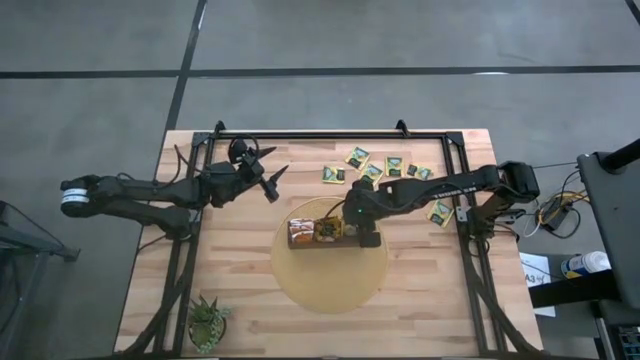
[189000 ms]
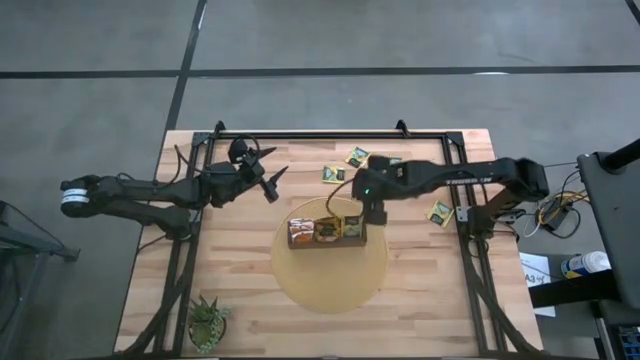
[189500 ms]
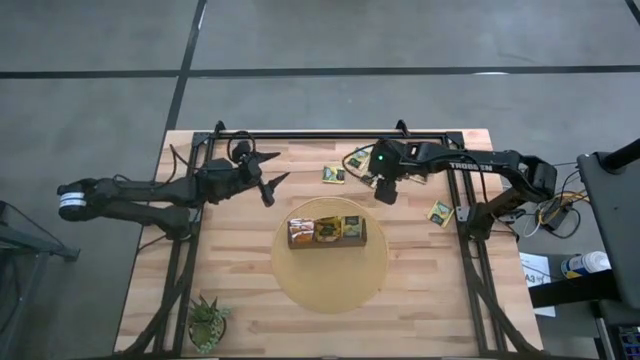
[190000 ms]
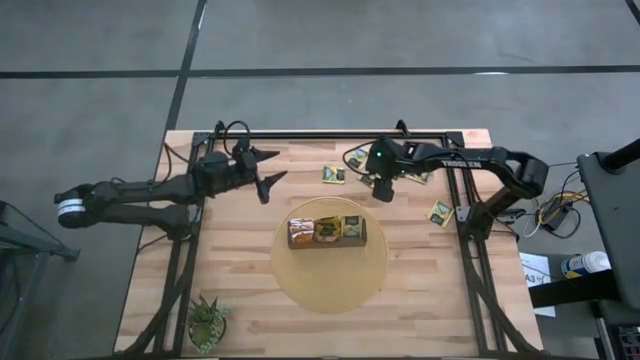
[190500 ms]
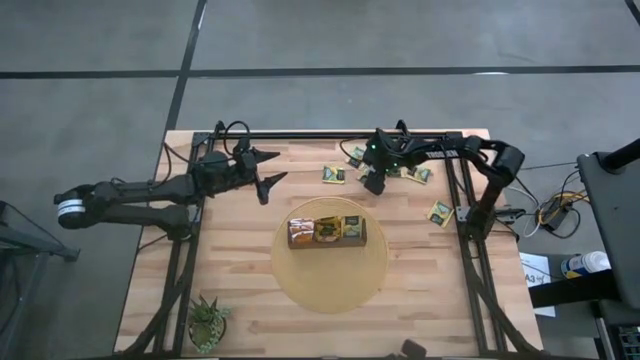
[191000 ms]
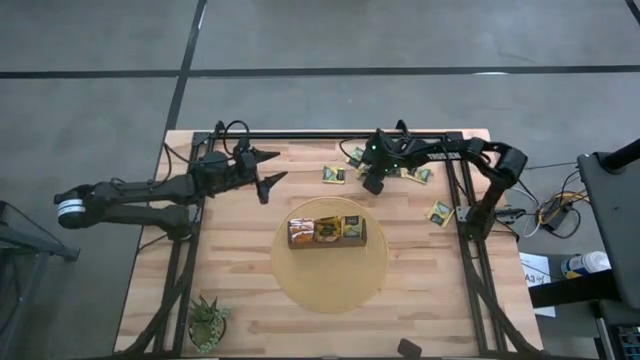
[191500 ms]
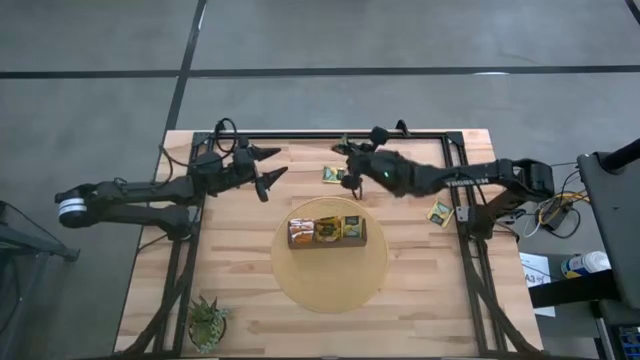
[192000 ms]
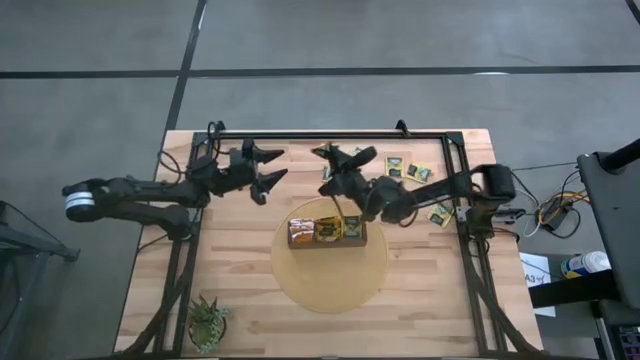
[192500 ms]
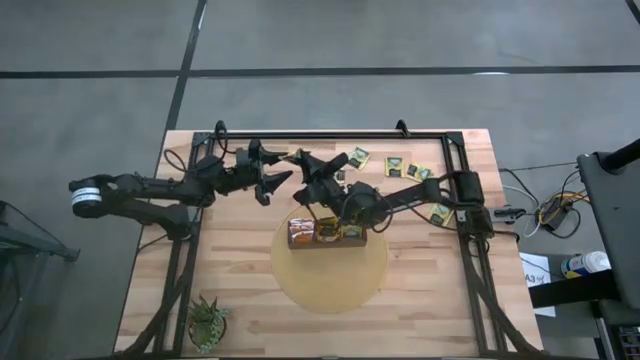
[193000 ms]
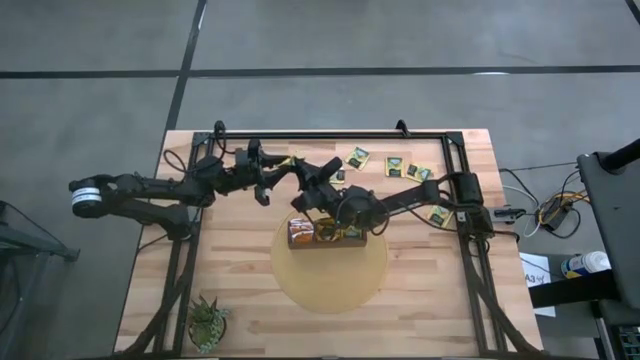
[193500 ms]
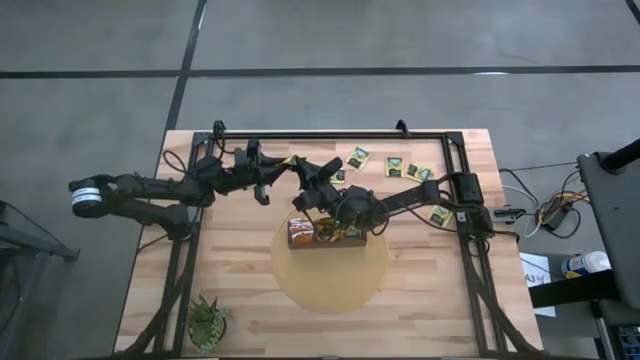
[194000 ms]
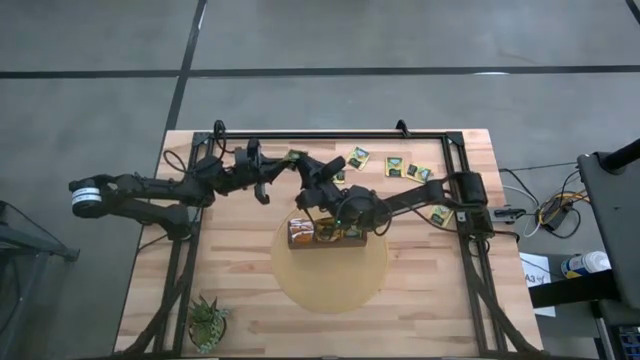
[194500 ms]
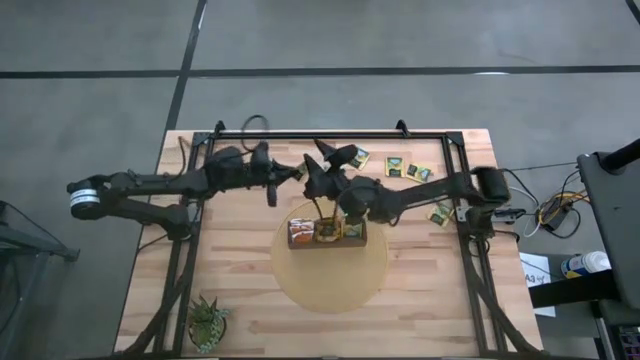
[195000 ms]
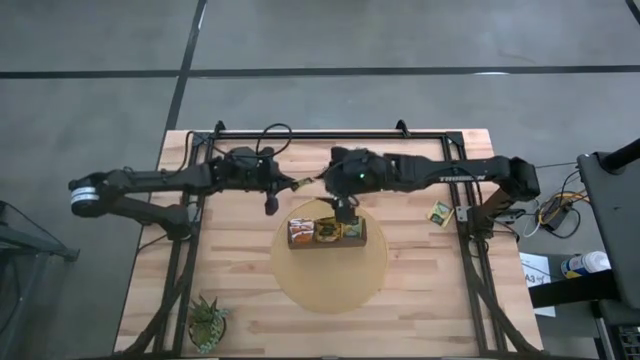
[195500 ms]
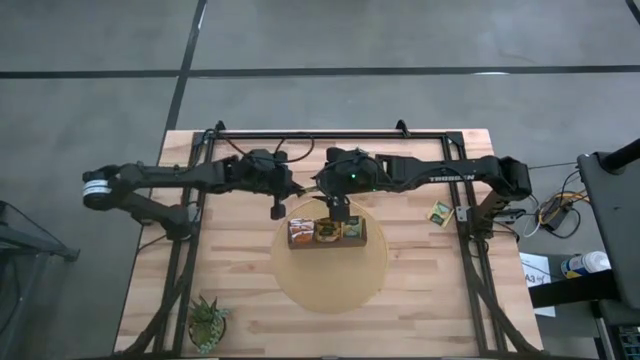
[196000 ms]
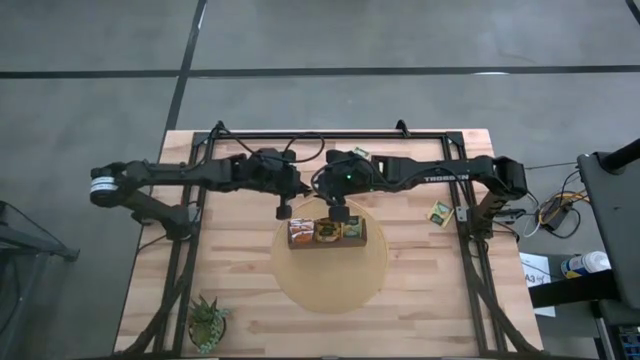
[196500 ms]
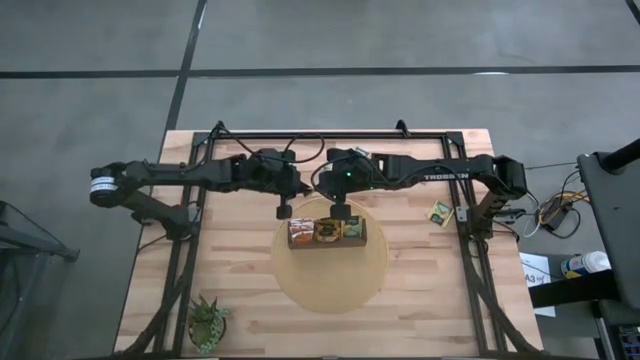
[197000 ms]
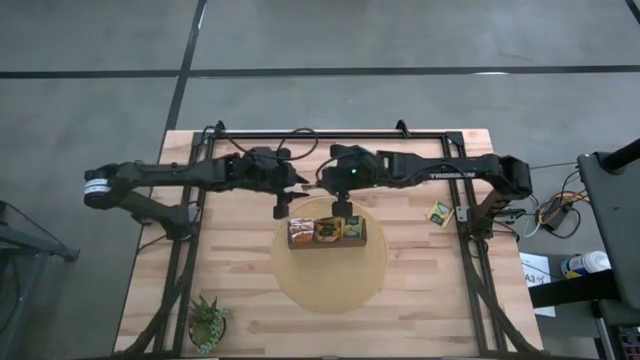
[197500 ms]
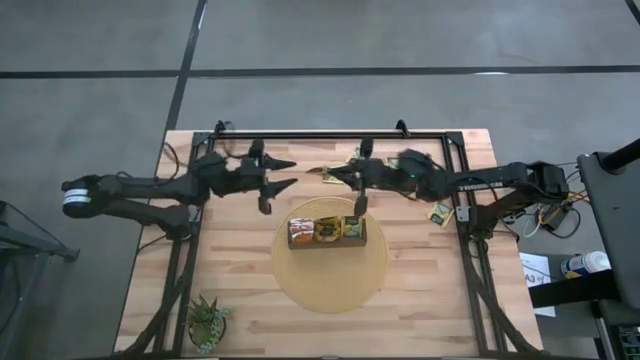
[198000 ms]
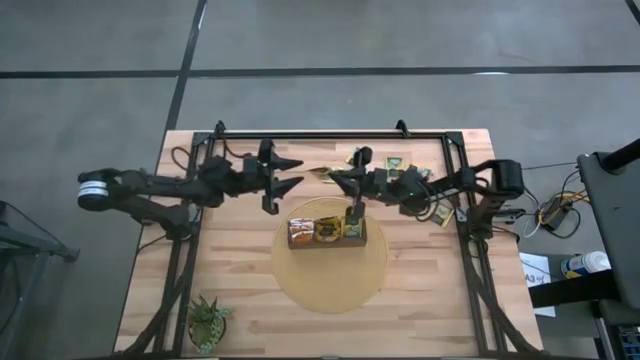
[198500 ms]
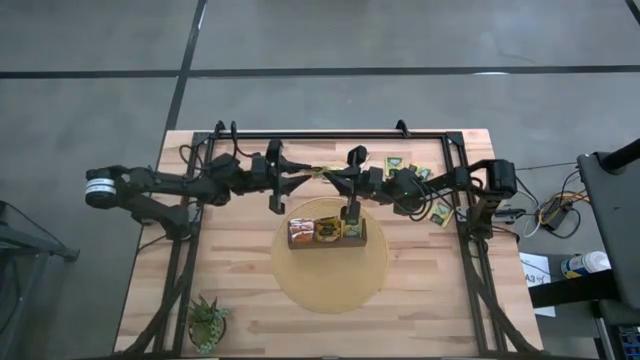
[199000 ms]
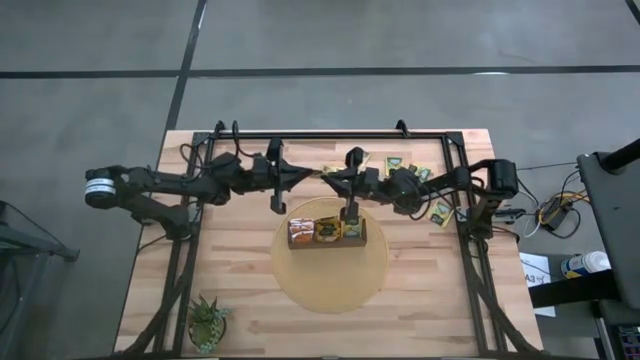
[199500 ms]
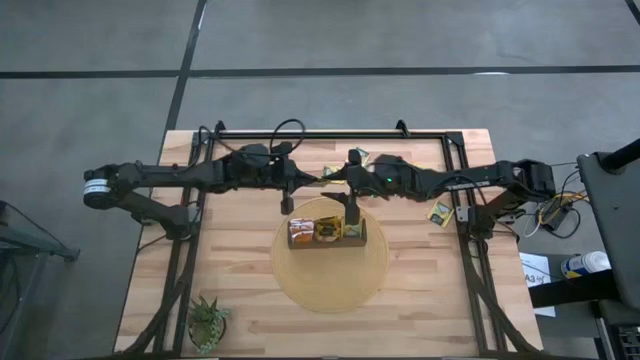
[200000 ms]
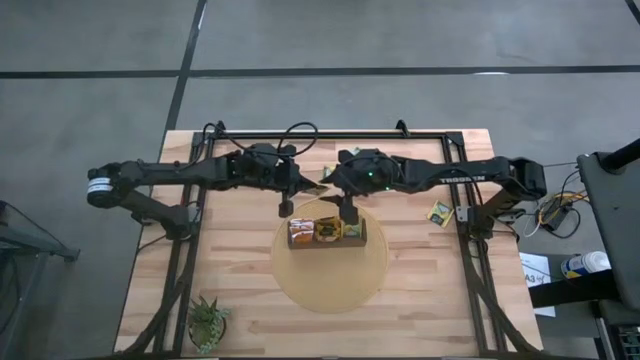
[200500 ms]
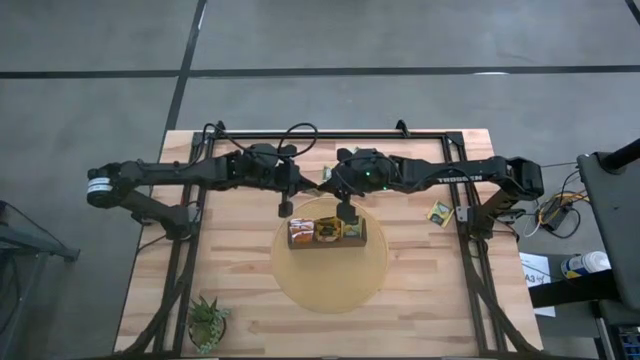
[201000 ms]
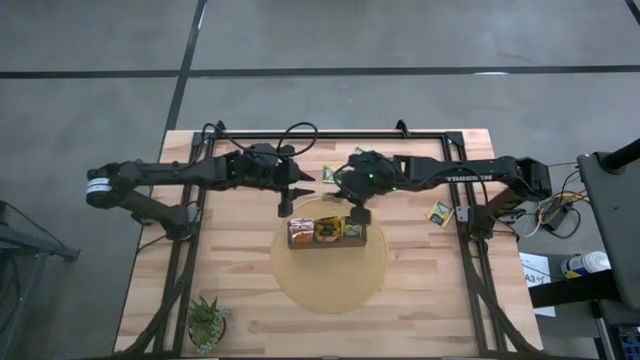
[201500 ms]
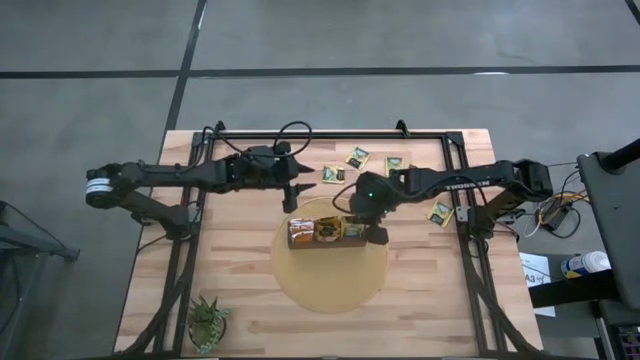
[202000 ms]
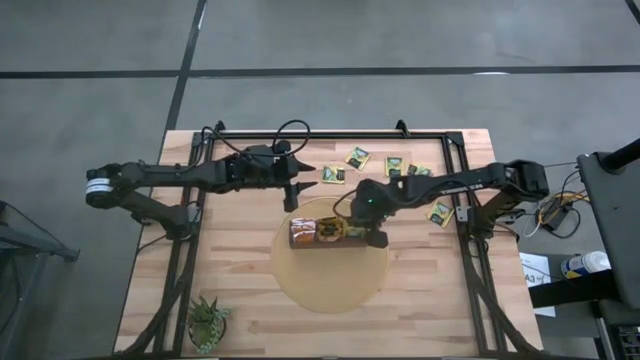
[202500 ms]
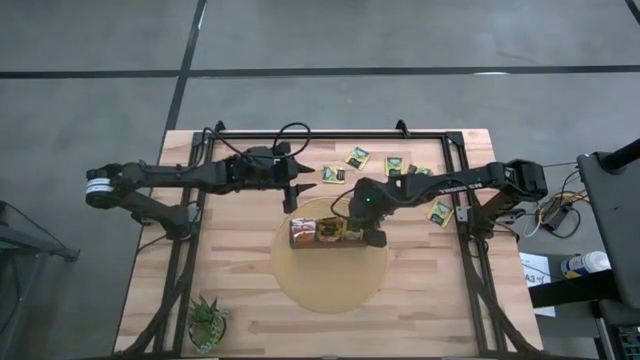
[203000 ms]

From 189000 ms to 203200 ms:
Task: Pick & Place Tea
Put the yellow tea bag into the right section of the wooden organizer

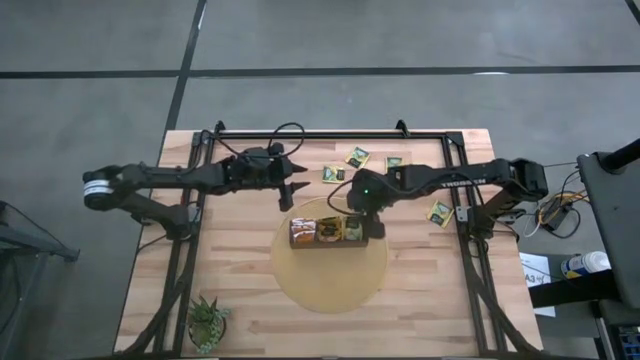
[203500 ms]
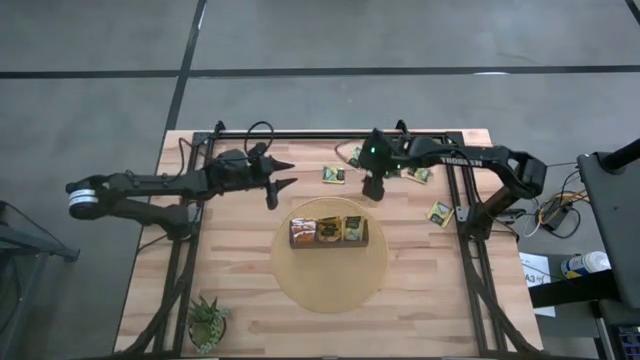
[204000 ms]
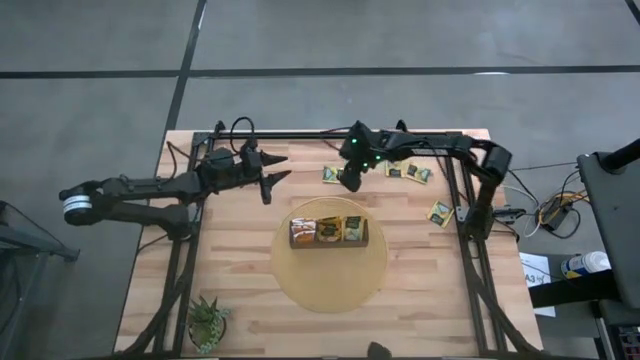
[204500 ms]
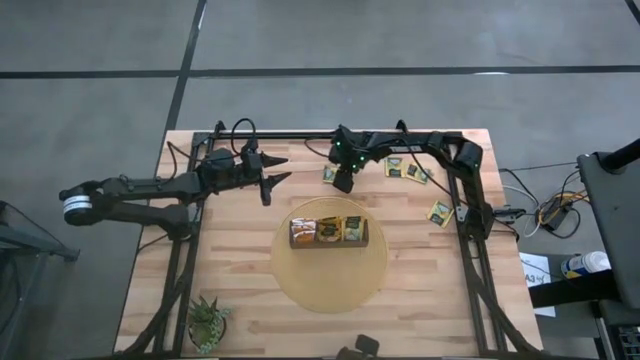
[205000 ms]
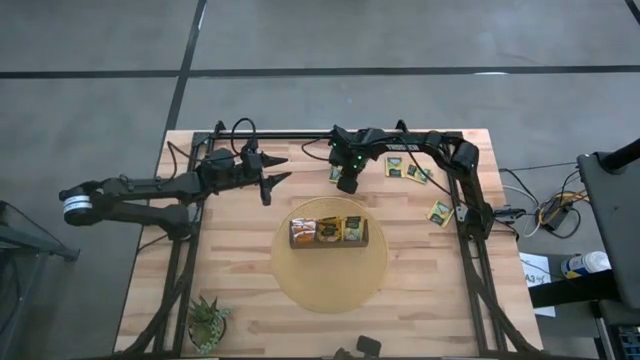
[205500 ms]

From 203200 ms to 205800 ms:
Put the yellow tea bag into the right section of the wooden organizer

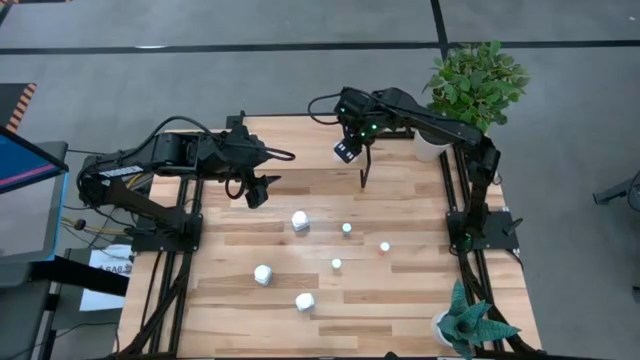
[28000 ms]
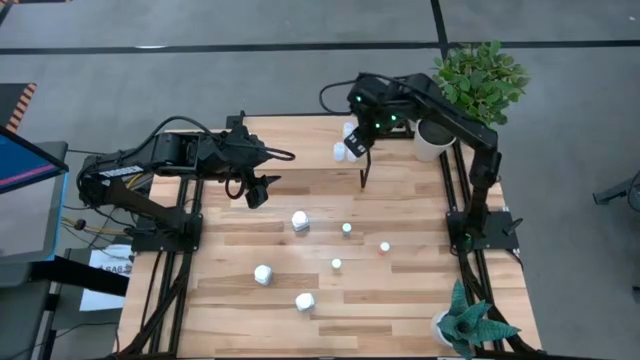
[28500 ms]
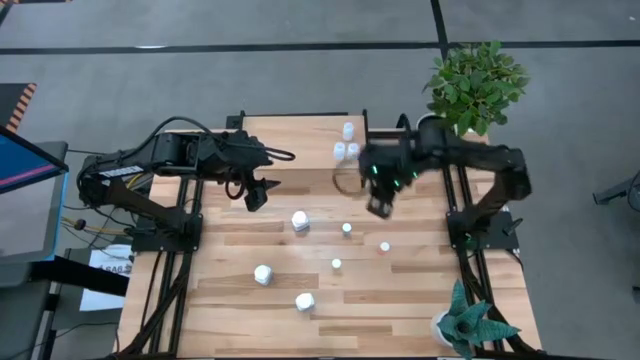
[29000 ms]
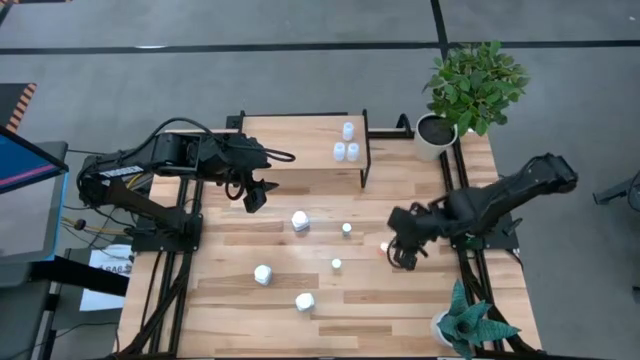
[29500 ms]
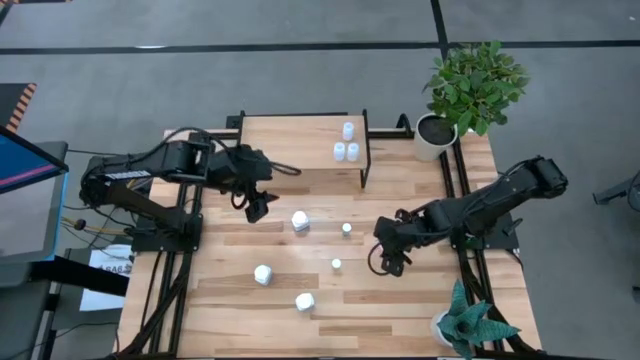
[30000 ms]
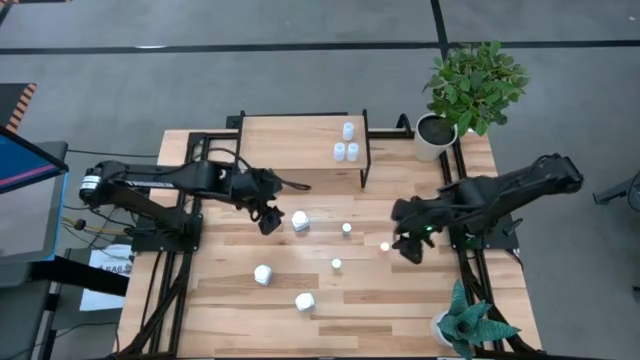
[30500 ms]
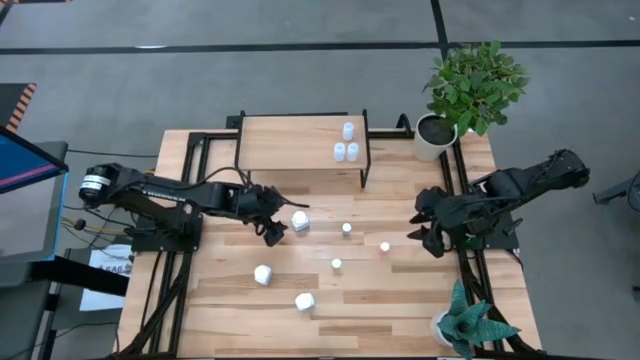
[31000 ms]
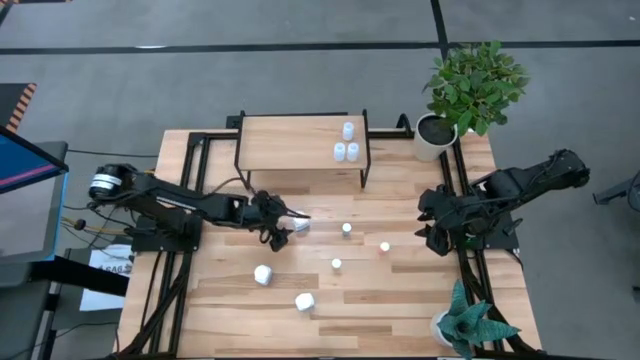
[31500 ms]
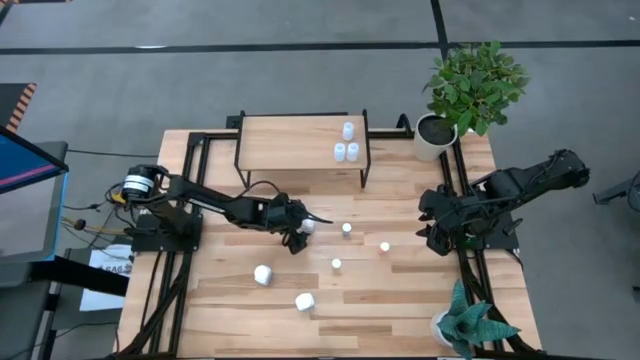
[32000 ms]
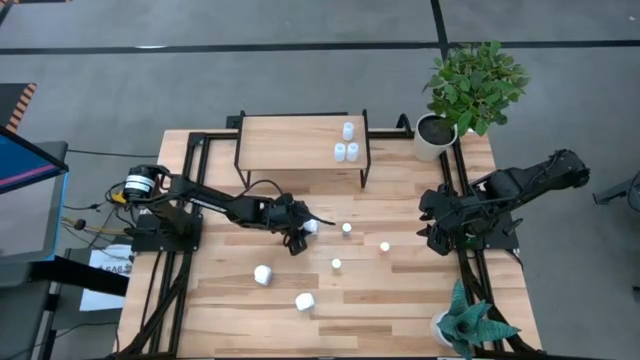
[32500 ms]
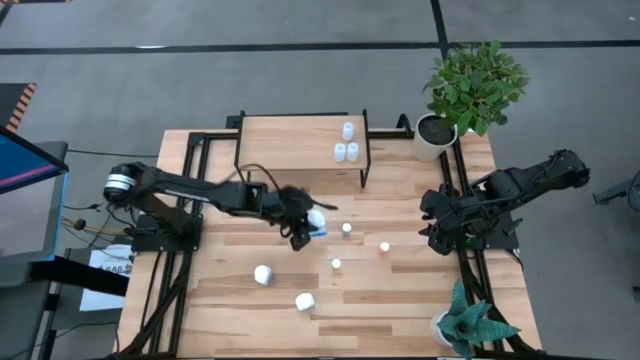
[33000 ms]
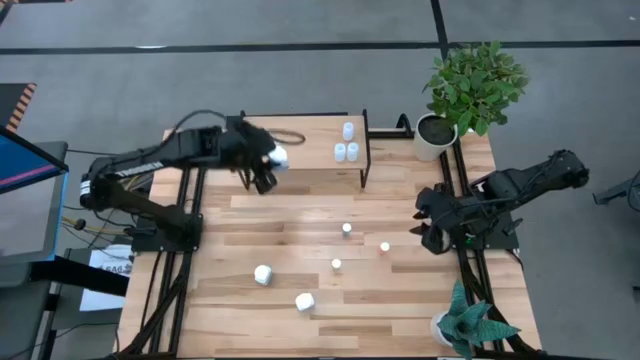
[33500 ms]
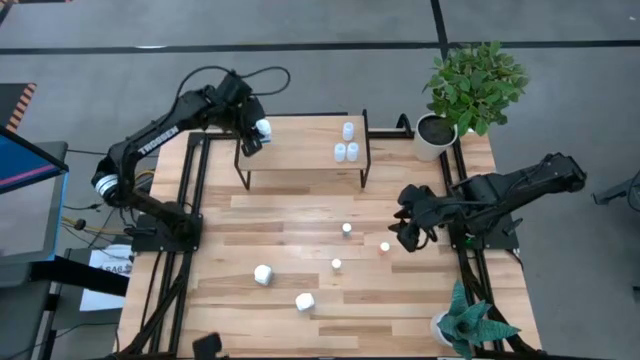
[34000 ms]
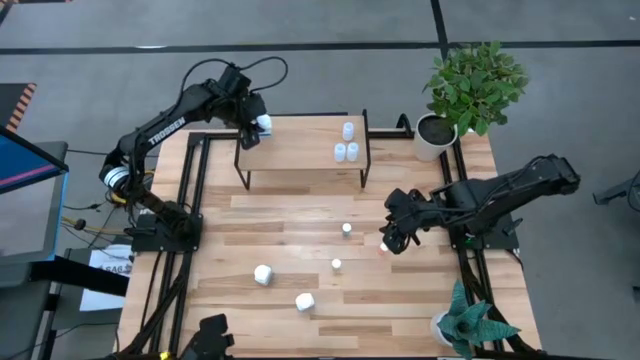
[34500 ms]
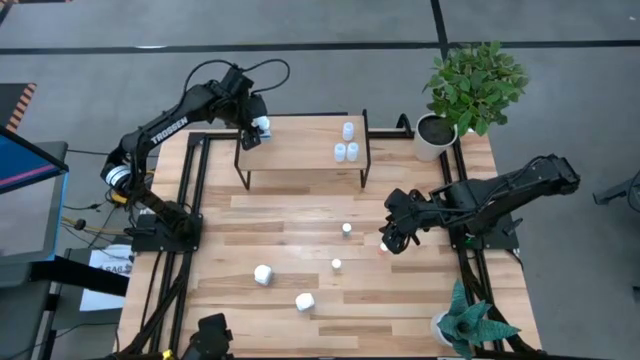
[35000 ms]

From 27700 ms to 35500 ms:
Task: Pick and place medicine bottles onto shelf by color
Put the top right white medicine bottle on the shelf
